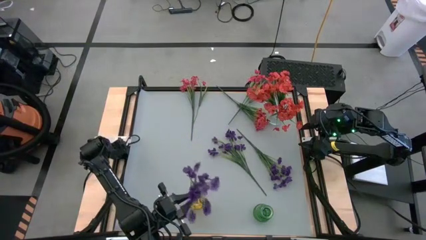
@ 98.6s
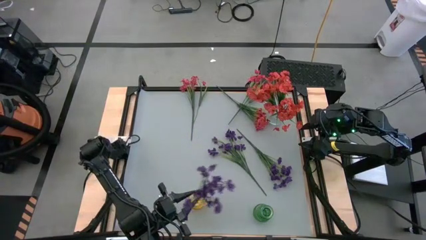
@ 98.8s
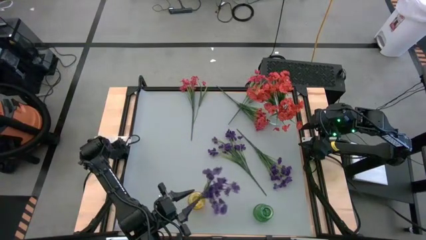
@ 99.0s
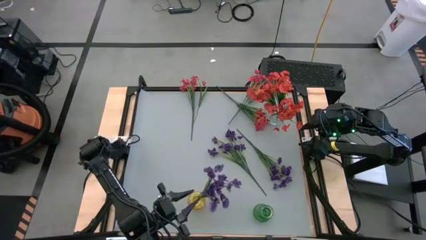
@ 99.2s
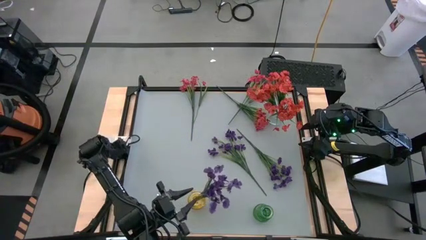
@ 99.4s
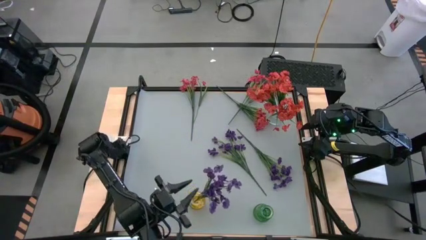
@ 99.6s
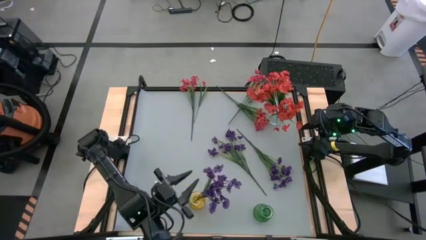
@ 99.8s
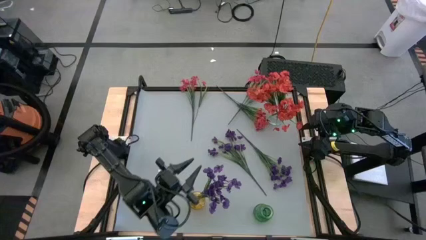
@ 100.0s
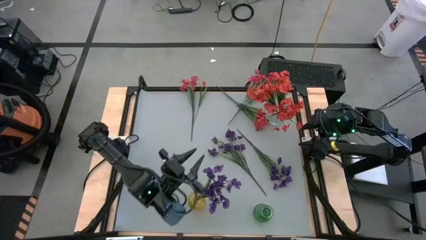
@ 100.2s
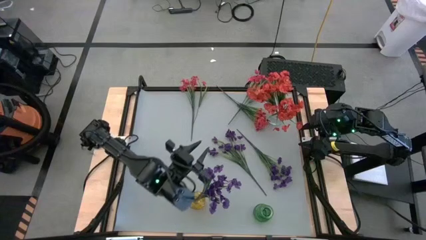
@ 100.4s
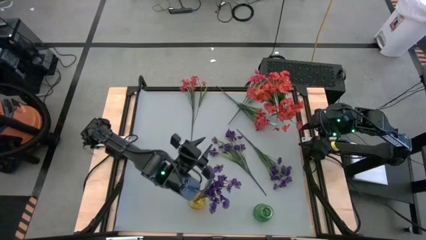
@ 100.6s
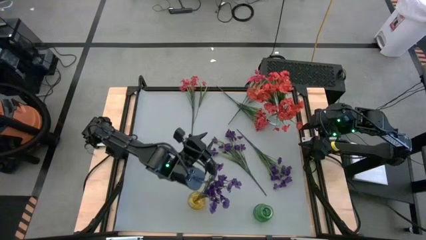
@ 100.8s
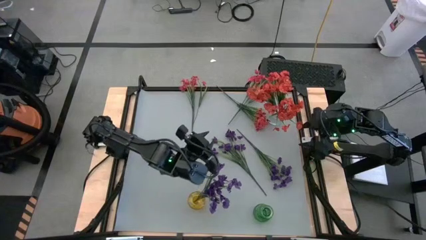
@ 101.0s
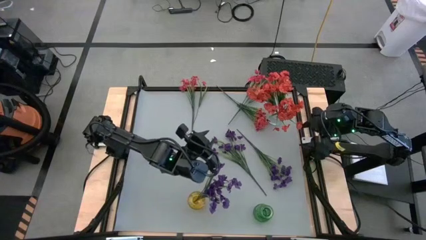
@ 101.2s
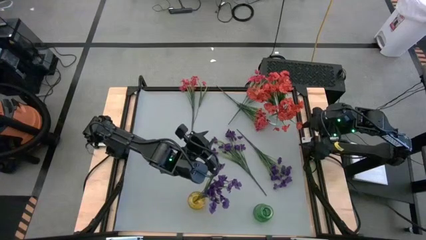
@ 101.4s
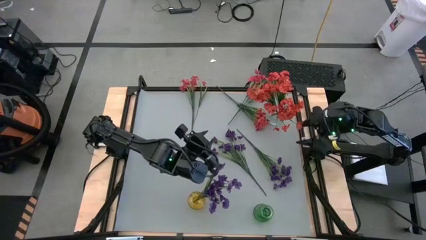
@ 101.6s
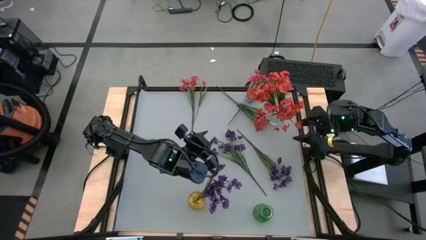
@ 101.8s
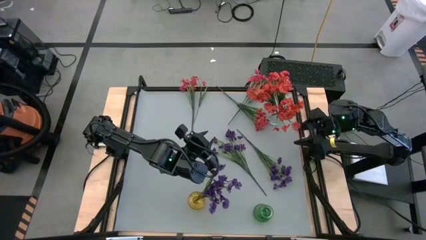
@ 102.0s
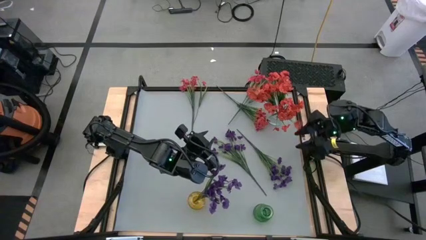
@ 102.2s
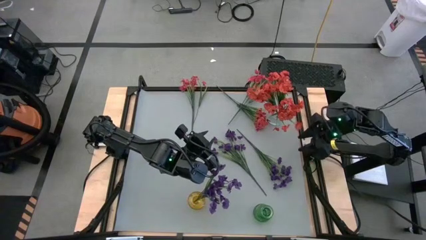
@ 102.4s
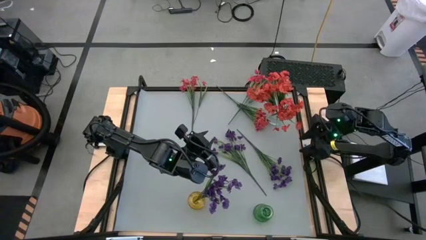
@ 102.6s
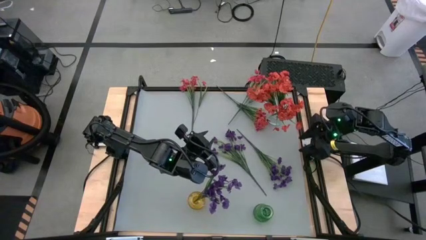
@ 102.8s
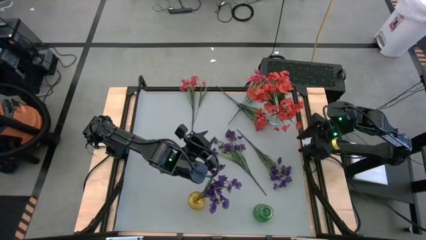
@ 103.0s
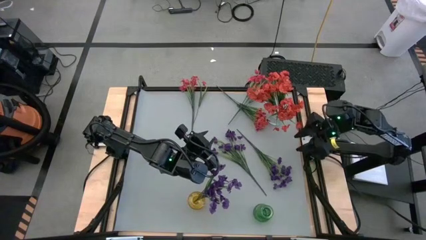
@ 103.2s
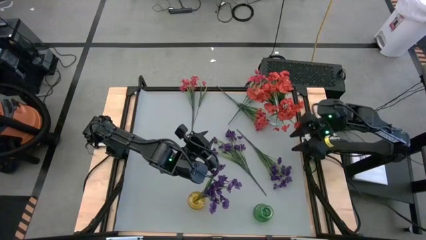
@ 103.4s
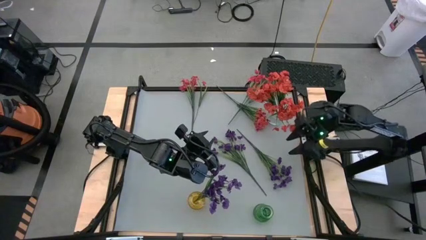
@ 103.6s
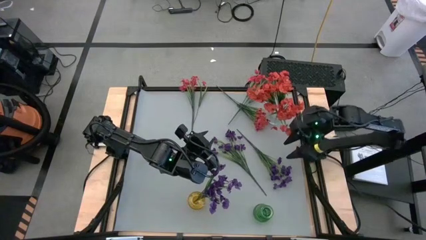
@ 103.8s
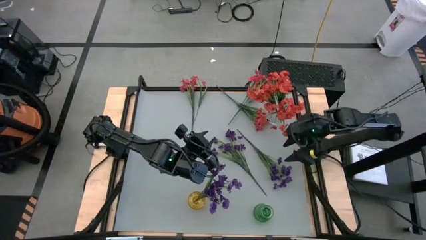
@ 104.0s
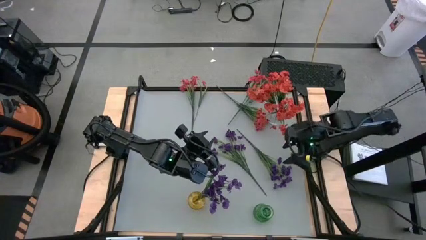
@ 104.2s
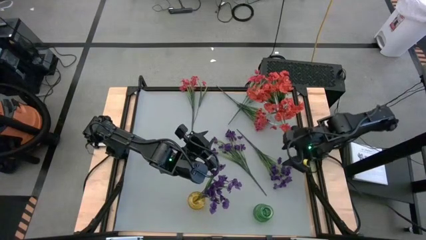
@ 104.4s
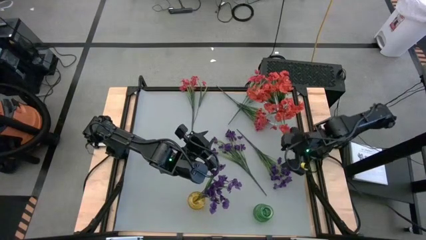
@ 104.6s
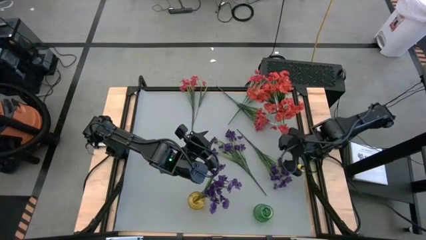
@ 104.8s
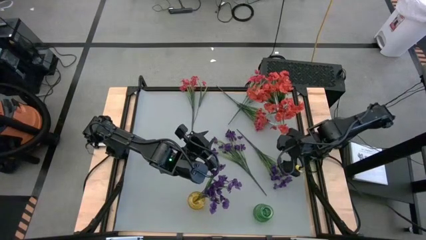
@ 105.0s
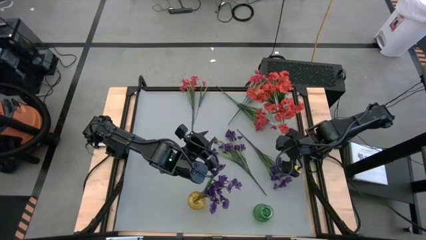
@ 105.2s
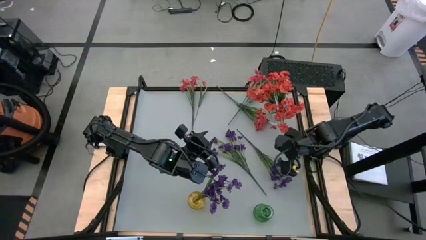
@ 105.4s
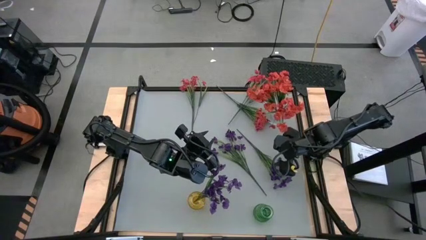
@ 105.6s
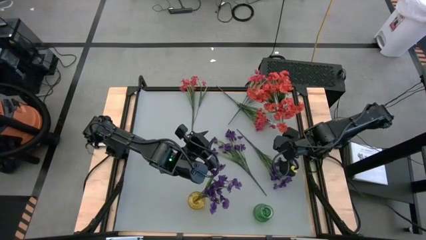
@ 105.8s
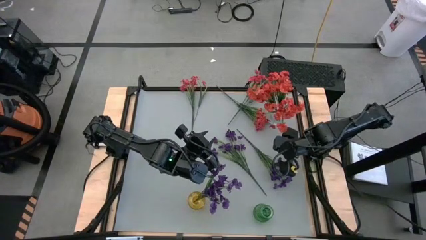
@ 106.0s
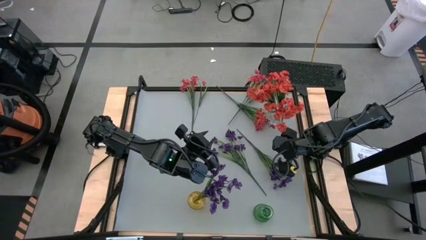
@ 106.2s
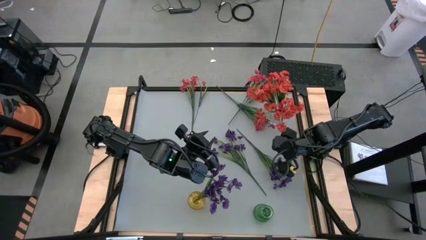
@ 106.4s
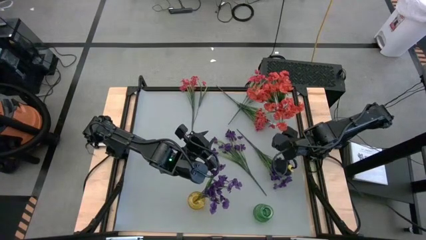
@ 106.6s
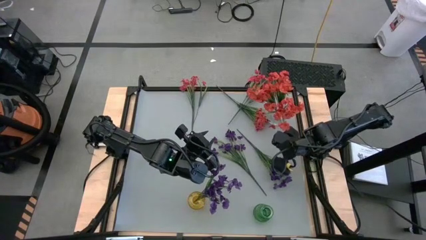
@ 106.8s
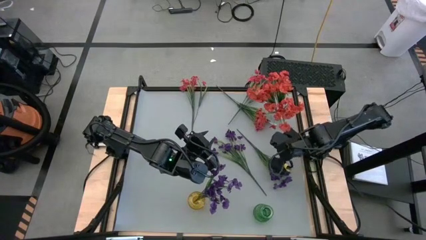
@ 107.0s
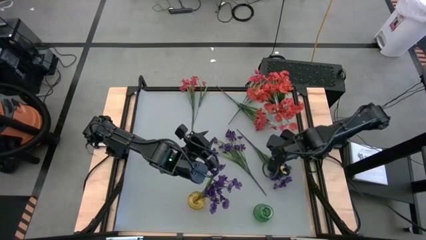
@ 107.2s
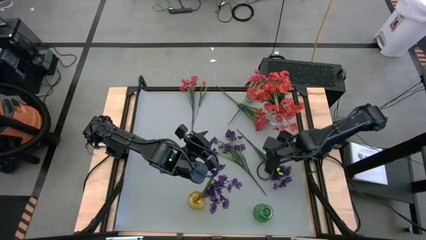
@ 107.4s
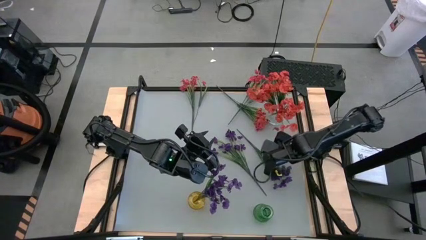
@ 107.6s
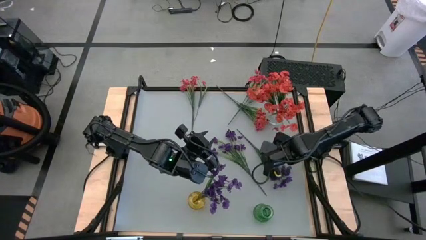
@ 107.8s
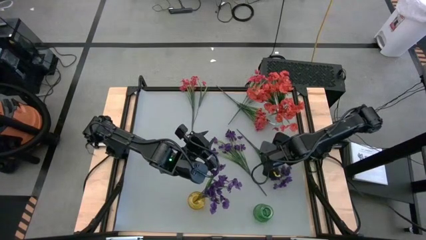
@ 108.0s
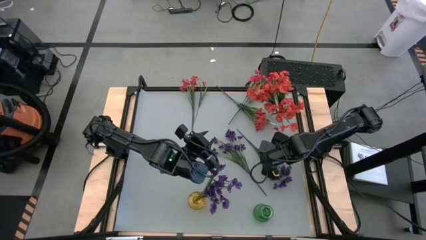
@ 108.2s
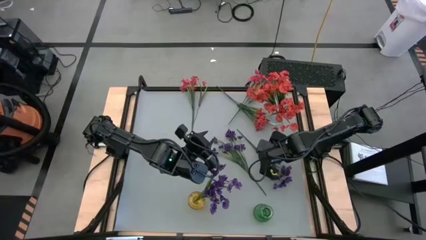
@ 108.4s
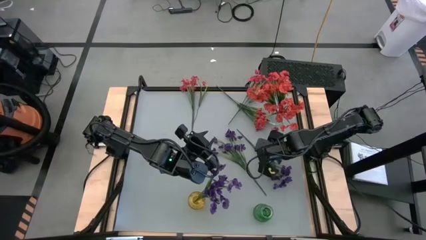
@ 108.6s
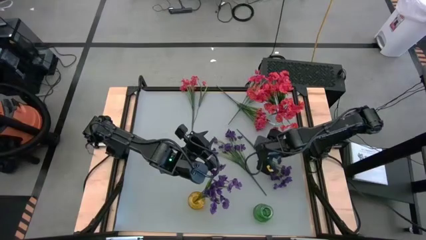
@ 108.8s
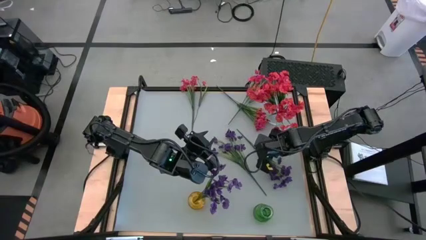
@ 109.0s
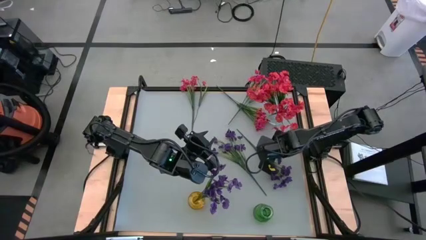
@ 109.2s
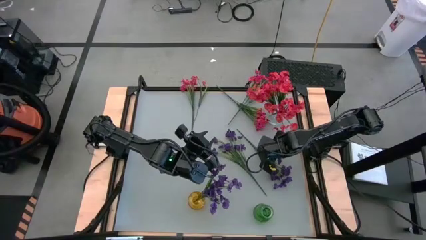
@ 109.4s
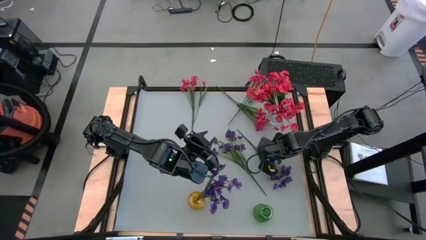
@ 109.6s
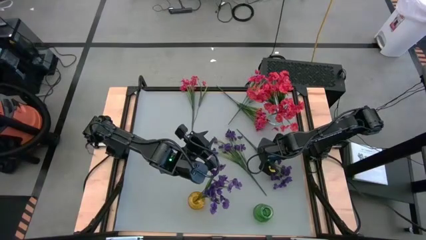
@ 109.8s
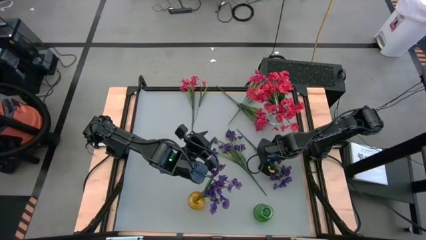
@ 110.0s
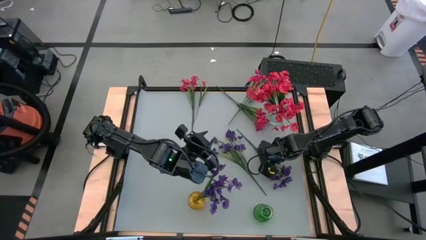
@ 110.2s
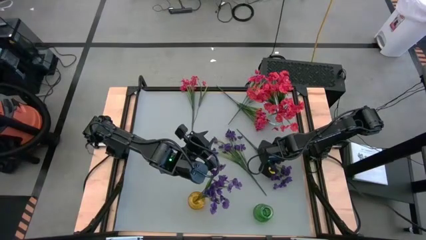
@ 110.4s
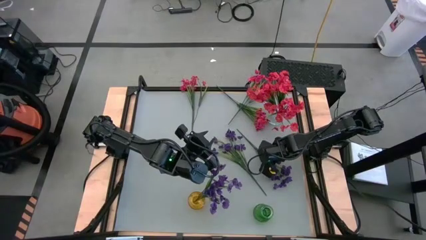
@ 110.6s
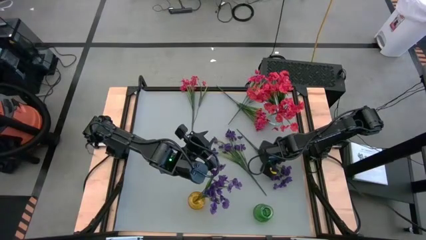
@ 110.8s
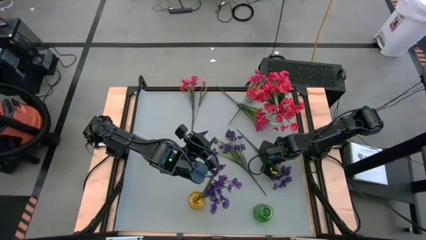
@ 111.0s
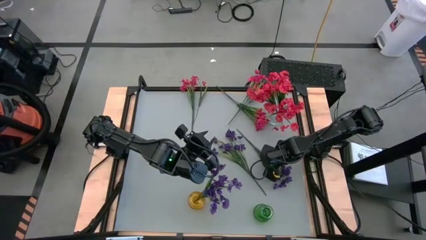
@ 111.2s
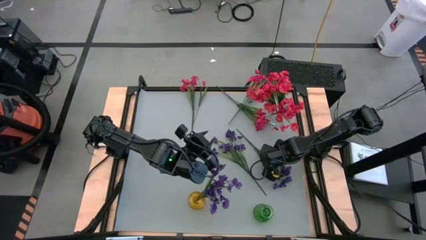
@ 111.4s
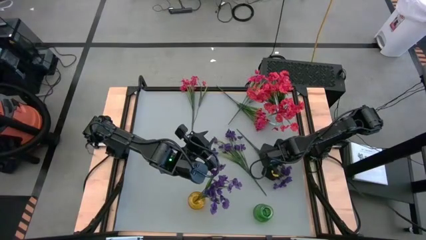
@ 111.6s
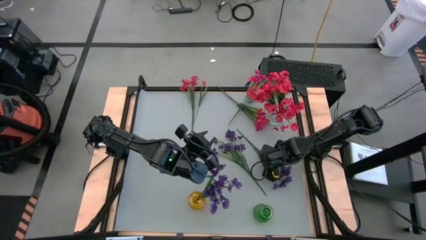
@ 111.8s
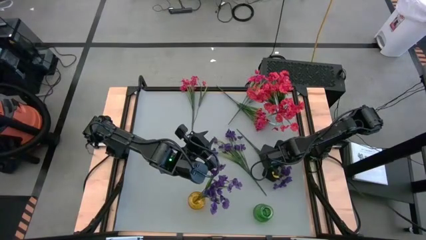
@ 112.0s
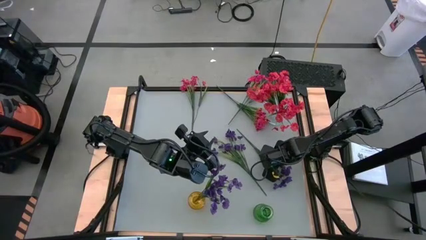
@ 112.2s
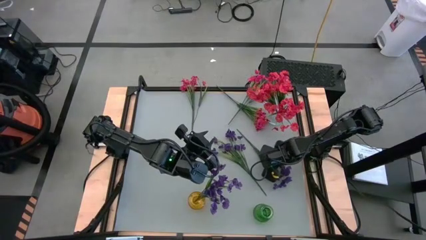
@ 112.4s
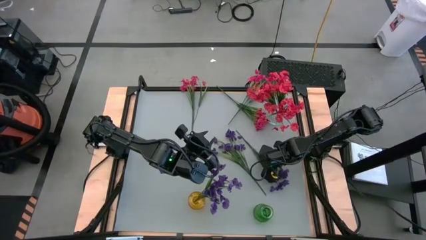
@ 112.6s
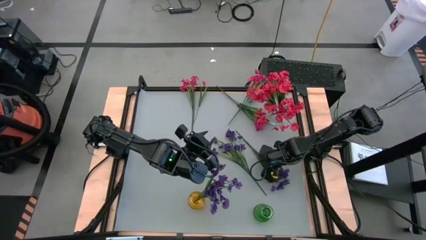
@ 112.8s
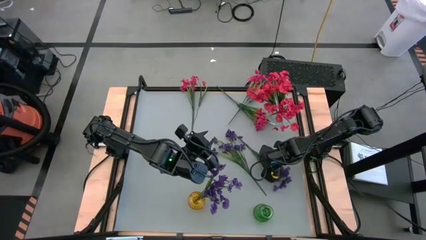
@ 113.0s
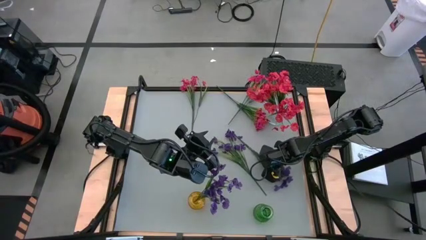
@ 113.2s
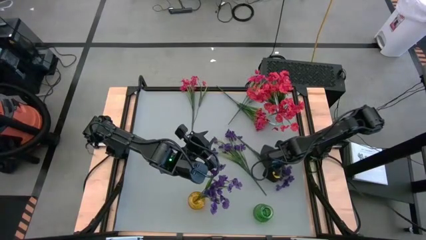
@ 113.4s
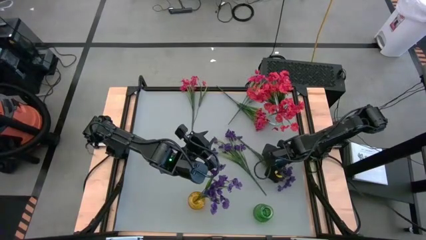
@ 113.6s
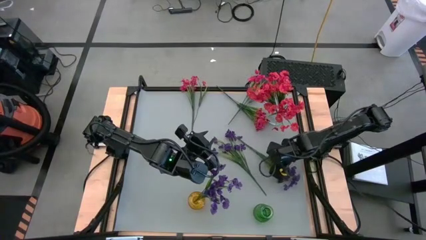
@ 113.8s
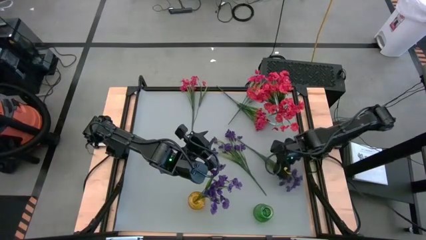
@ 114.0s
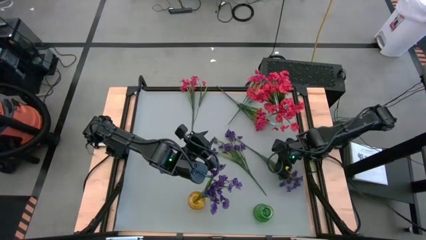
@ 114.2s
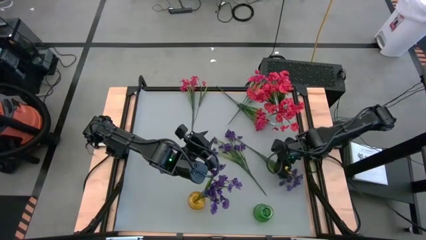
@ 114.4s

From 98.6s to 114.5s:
Task: Sort flowers into vase by color
Put the right purple flower into the yellow transparent vase

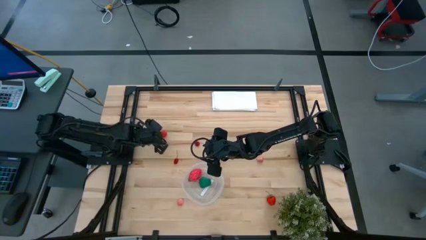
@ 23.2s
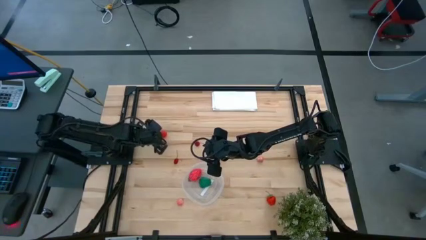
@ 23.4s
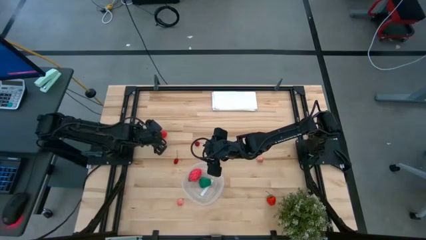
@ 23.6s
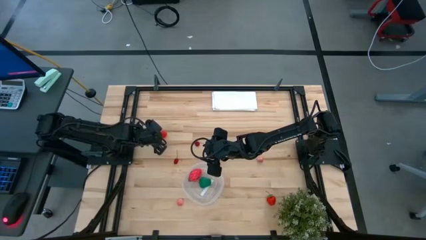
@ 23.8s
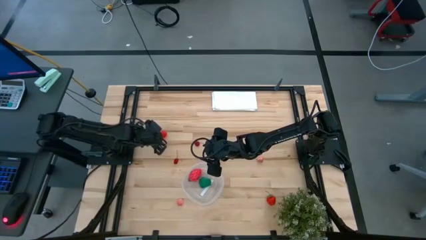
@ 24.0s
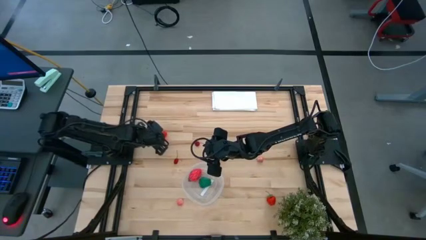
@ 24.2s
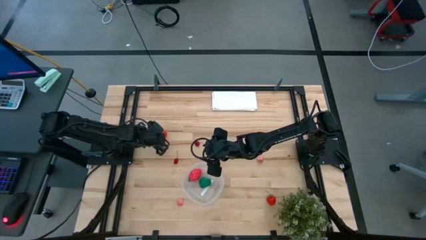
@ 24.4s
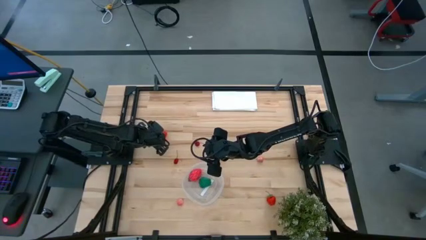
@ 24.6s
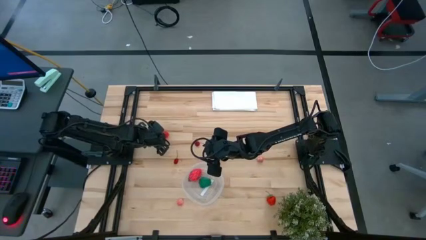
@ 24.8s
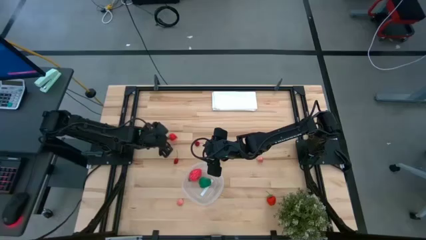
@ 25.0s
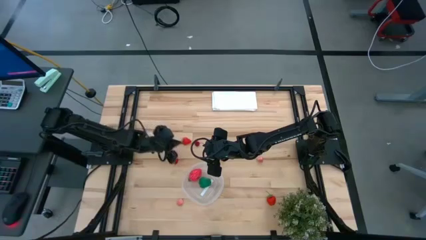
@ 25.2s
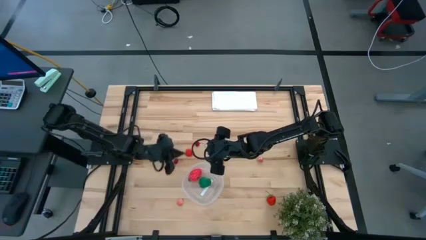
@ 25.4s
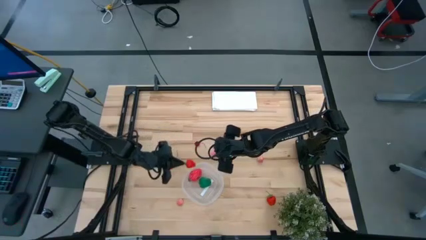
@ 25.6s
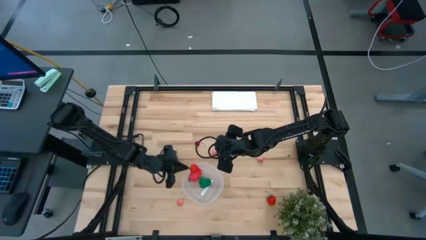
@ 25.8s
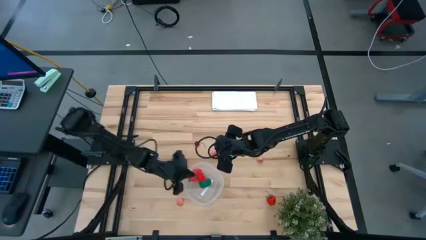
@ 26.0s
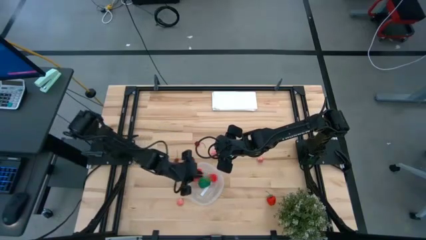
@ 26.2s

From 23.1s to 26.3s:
Task: Pick and placing Produce into tupperware
Put the red strawberry into the transparent bin
